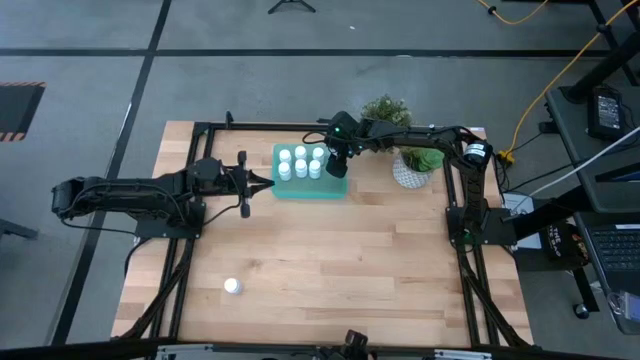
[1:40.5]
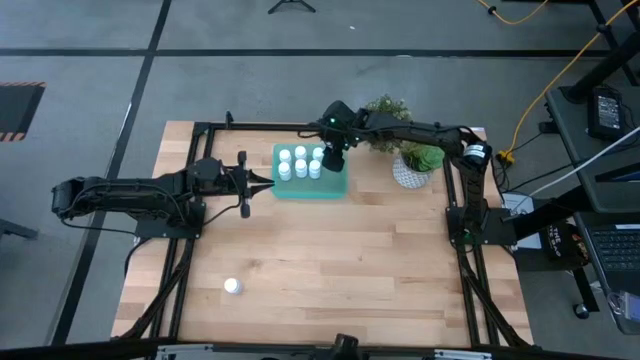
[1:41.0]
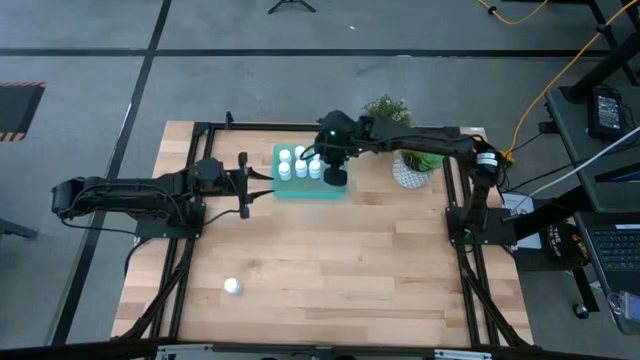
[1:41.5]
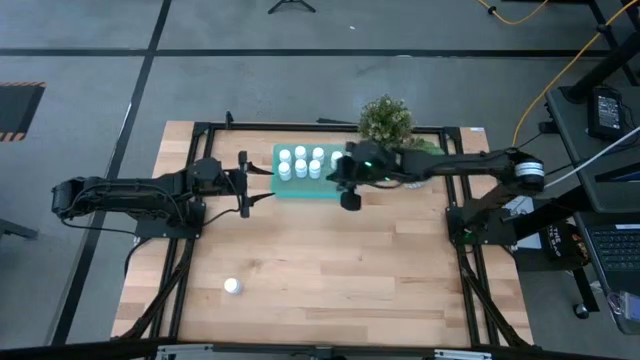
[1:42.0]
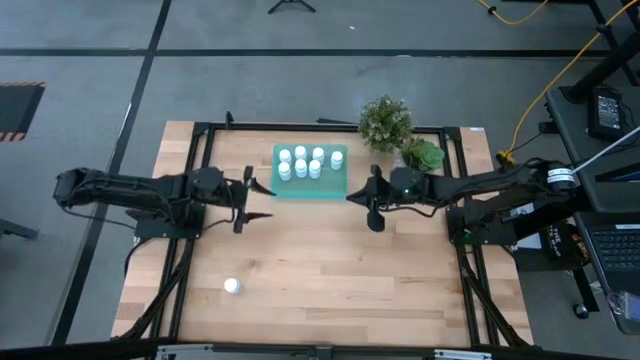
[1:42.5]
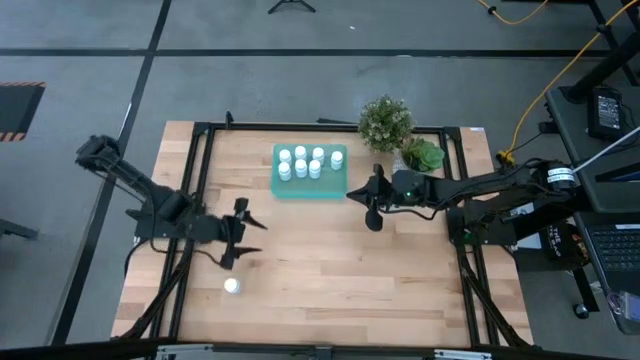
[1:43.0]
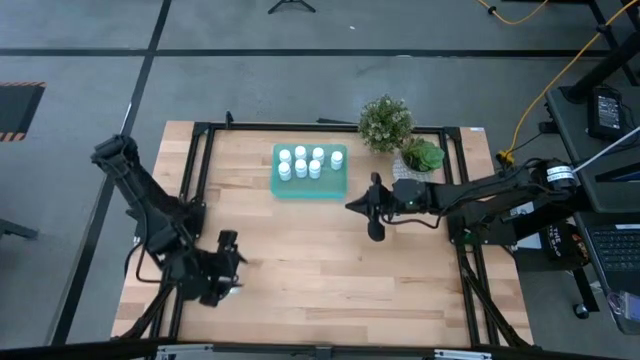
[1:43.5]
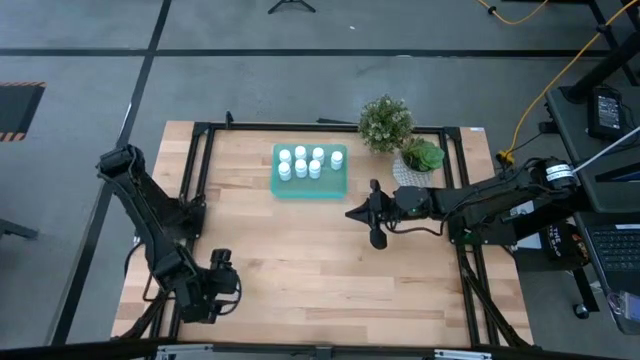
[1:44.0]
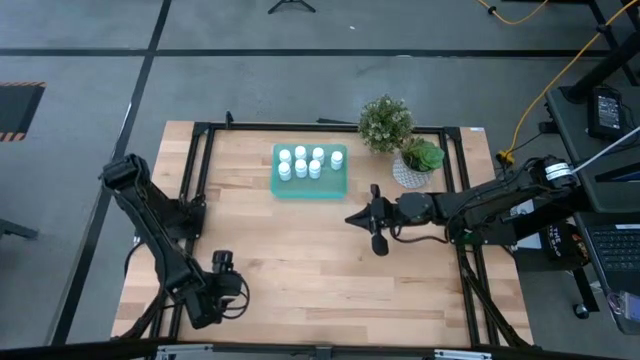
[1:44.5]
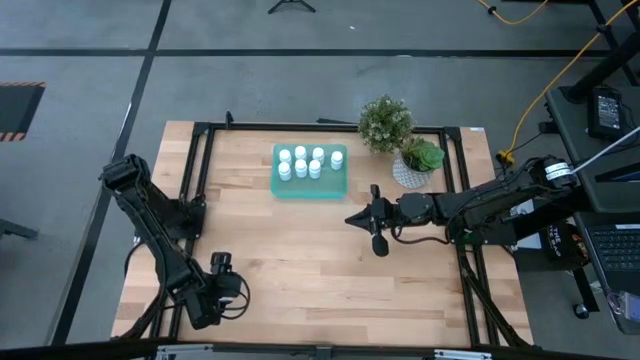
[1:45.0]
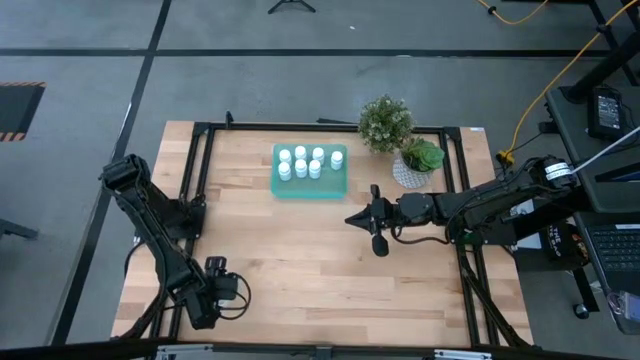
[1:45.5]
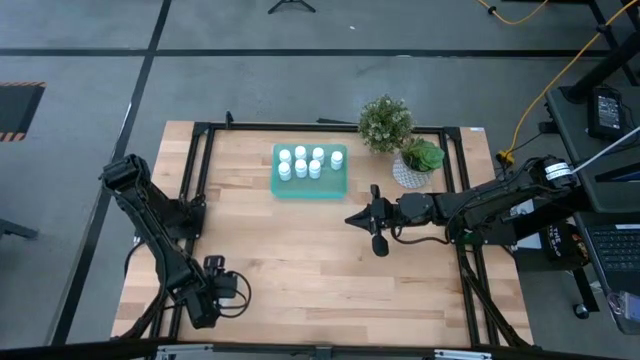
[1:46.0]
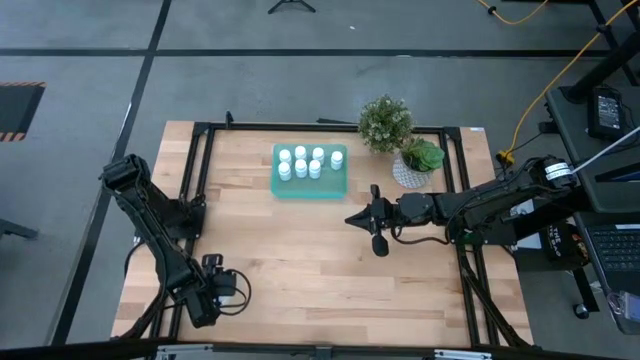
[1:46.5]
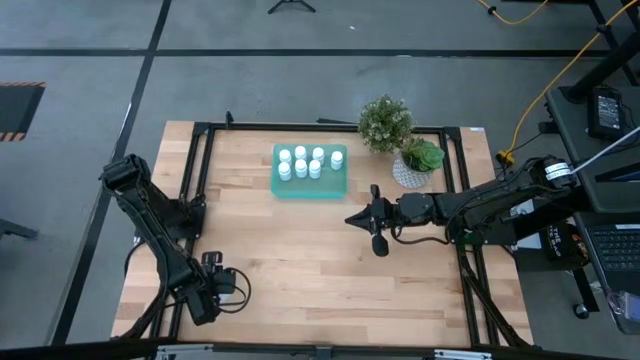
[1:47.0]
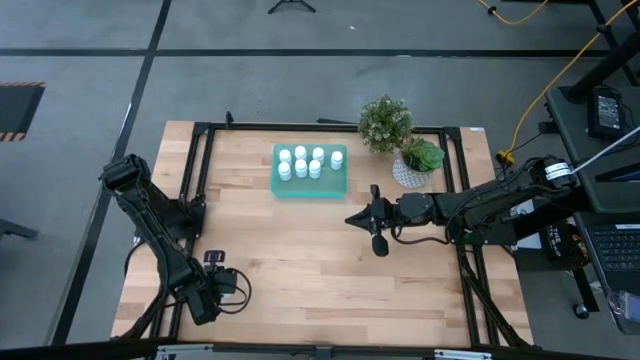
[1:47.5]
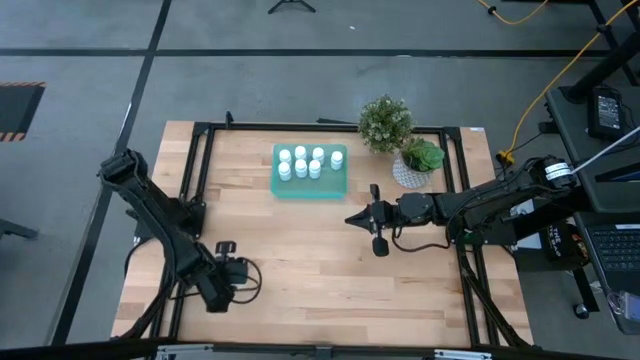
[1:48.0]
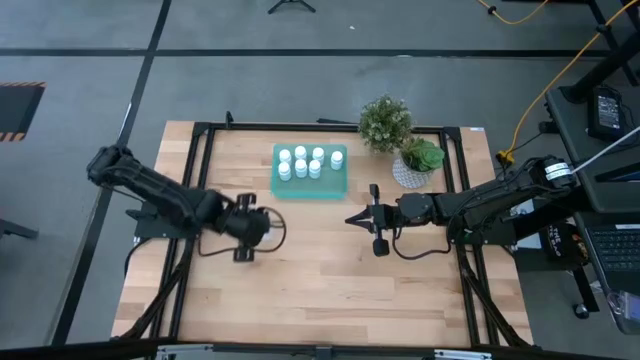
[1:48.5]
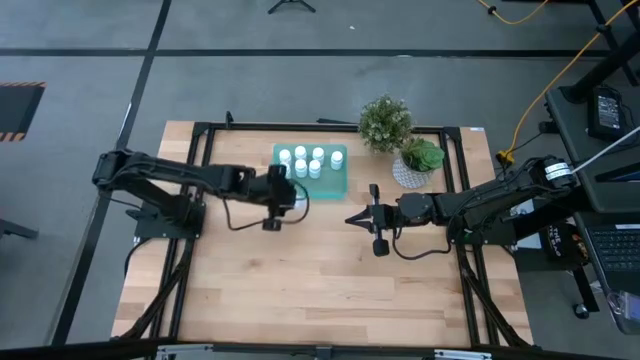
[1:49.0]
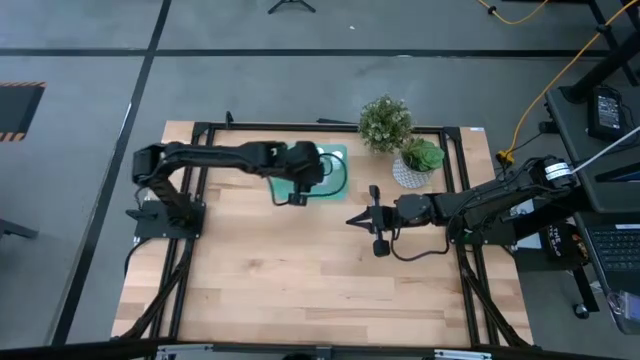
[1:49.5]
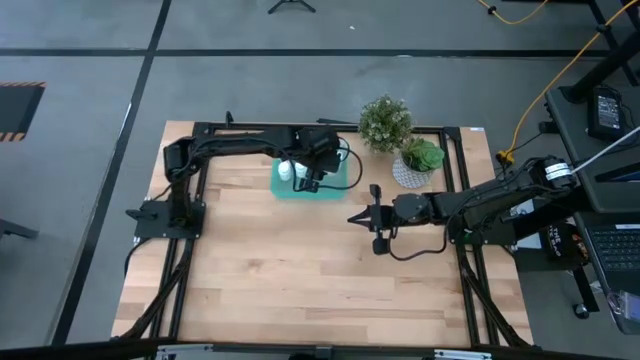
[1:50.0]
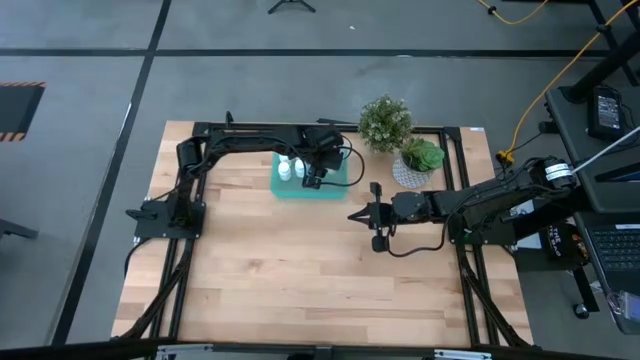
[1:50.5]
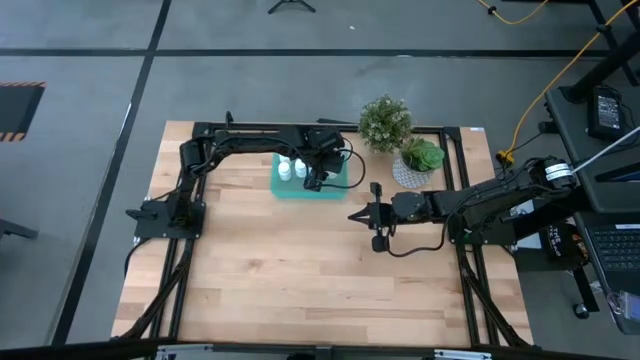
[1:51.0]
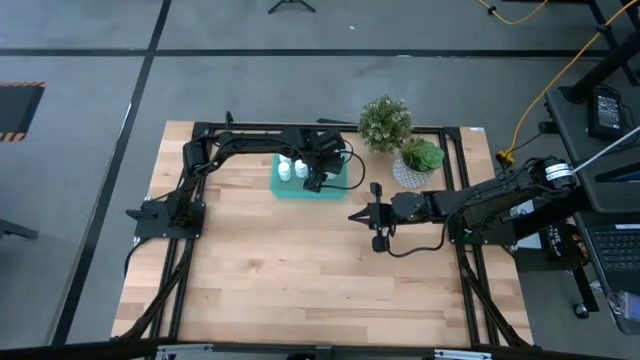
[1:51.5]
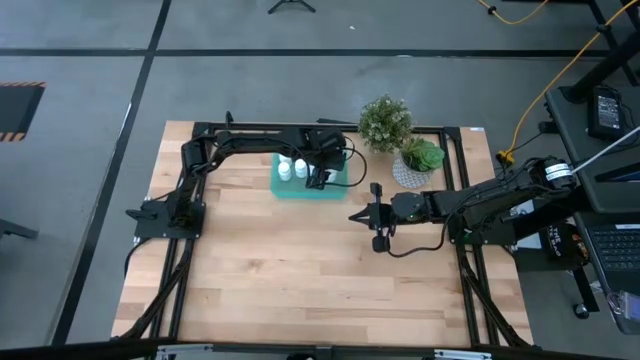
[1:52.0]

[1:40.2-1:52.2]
Task: Pick and place pill bottles into a basket
Put the white pill bottle into the green bin

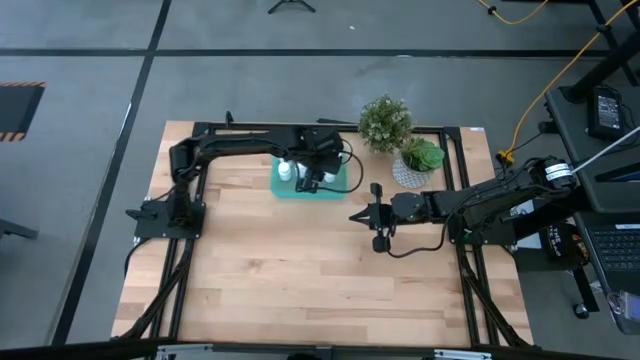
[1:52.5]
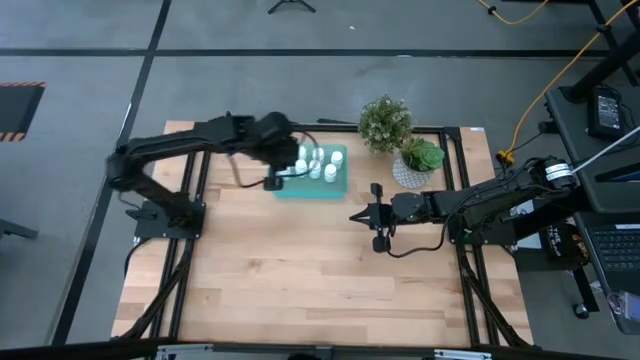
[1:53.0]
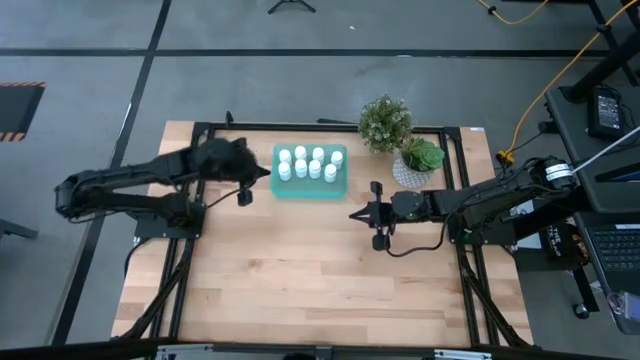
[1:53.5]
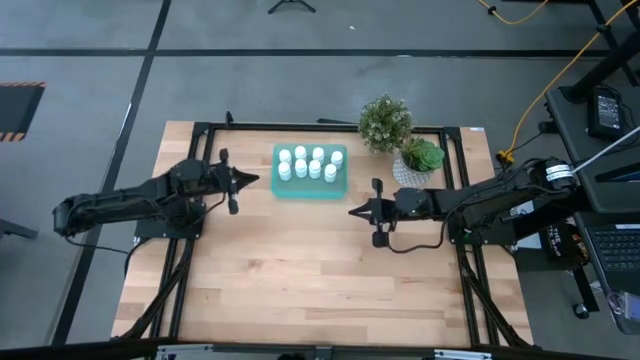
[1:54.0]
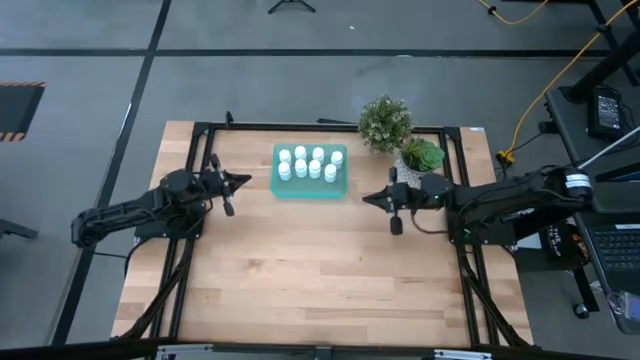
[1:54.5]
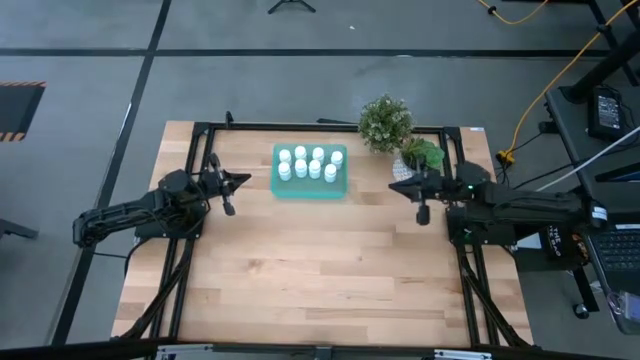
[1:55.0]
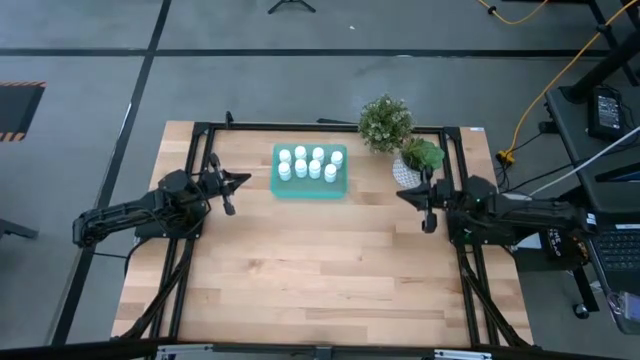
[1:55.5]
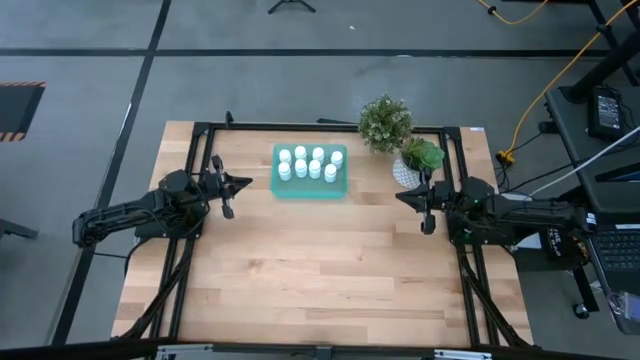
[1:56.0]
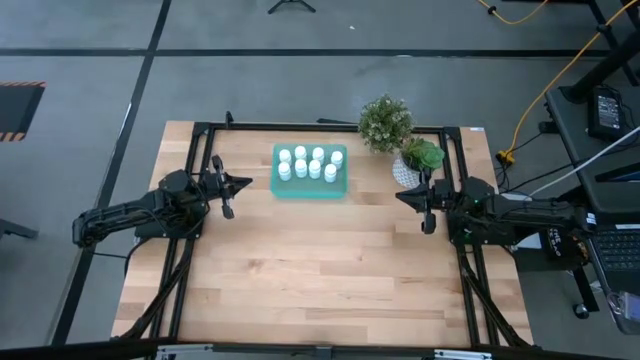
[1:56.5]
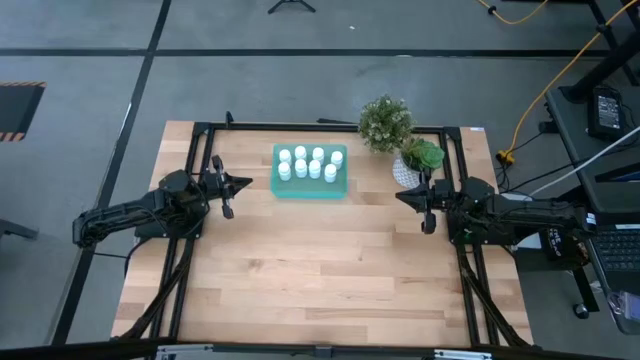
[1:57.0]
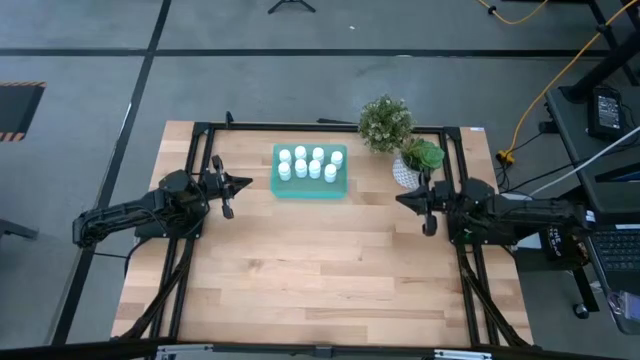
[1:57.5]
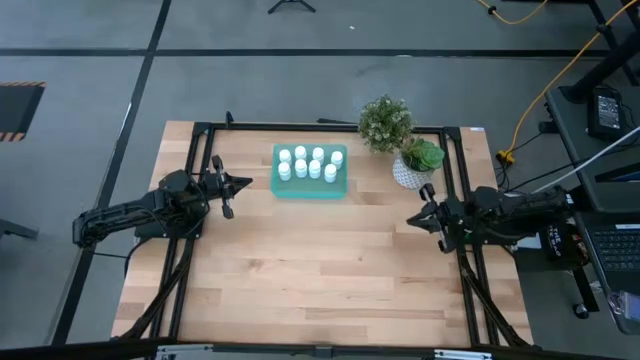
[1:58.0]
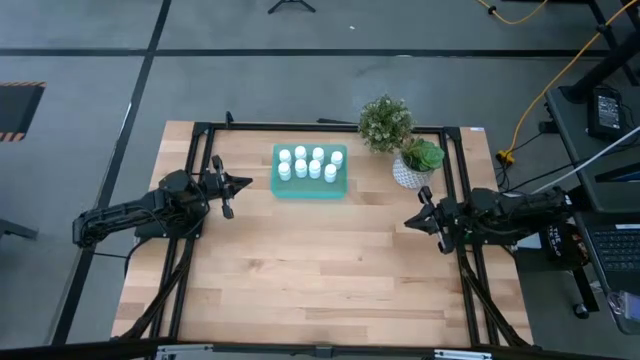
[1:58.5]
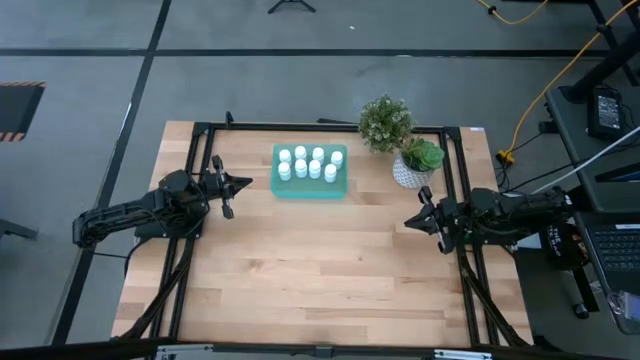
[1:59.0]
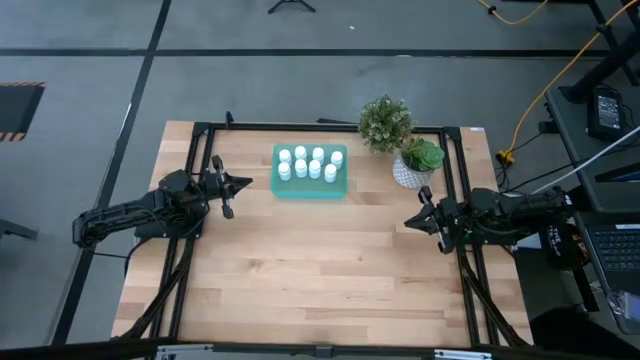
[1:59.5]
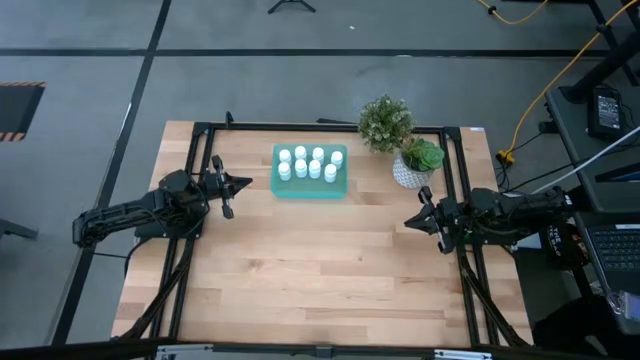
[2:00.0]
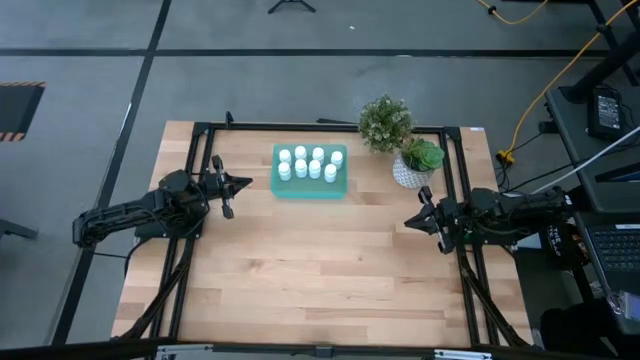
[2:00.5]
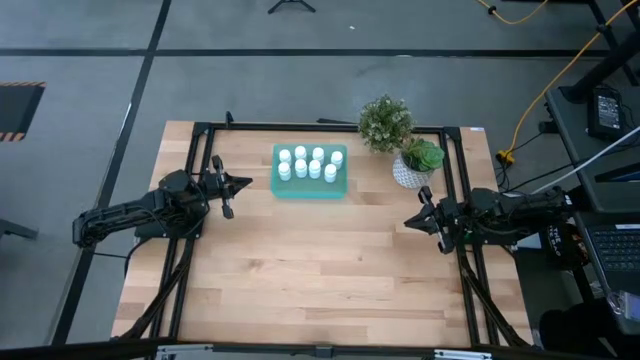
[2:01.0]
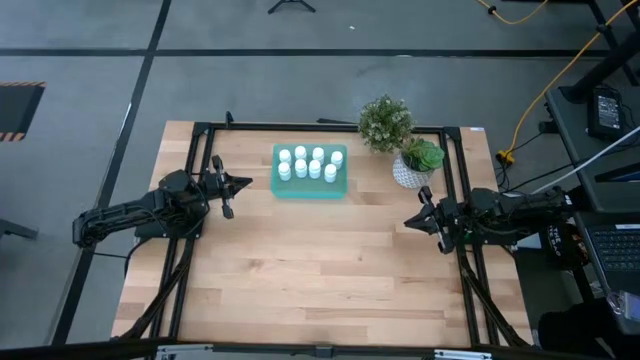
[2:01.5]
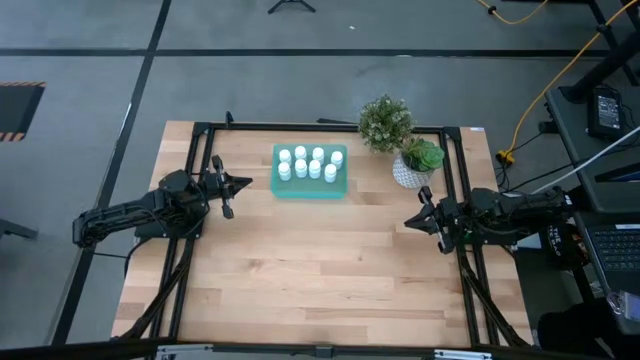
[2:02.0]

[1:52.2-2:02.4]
Return to Home Position
